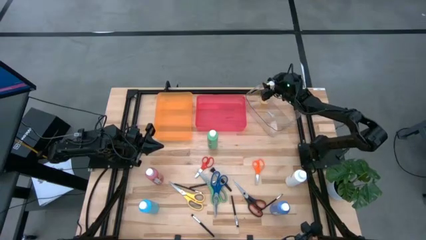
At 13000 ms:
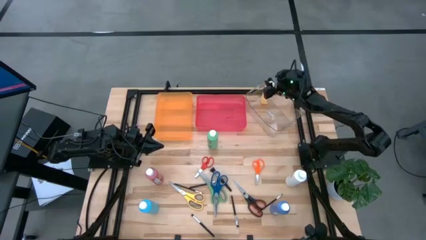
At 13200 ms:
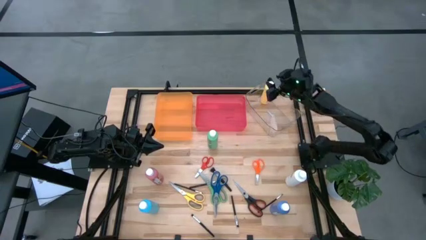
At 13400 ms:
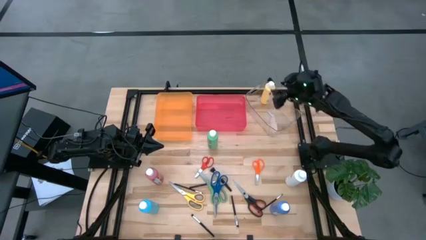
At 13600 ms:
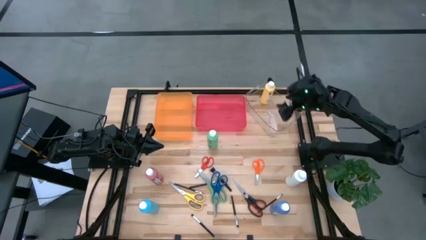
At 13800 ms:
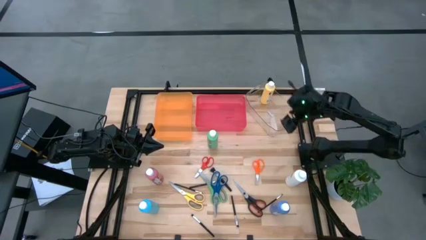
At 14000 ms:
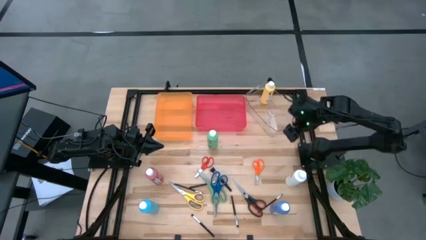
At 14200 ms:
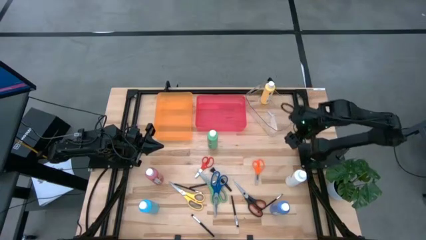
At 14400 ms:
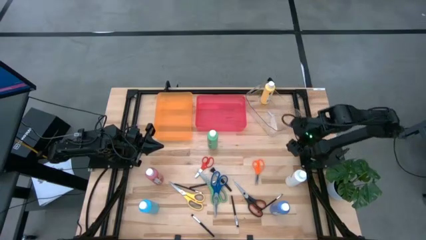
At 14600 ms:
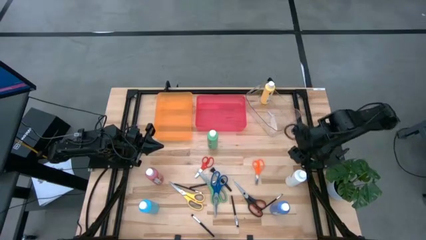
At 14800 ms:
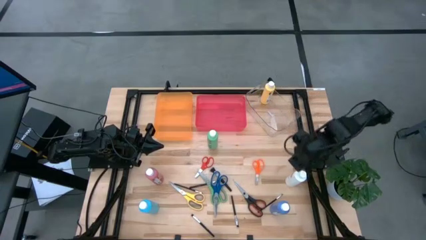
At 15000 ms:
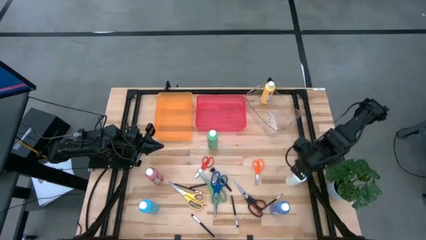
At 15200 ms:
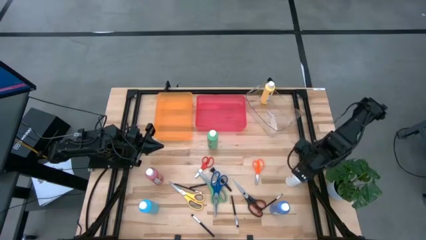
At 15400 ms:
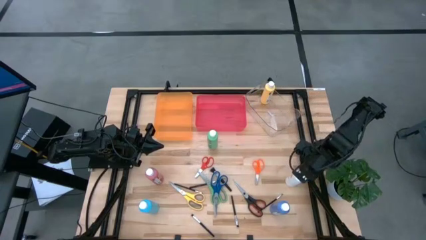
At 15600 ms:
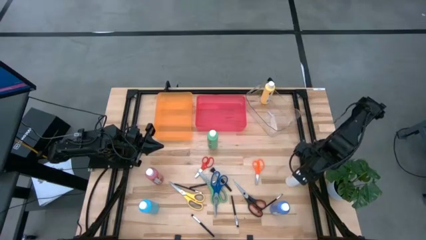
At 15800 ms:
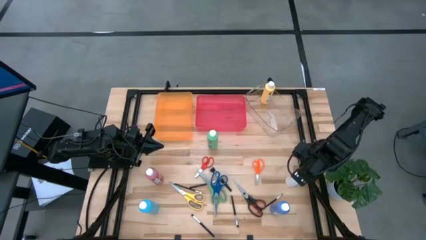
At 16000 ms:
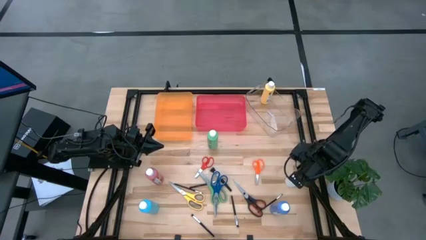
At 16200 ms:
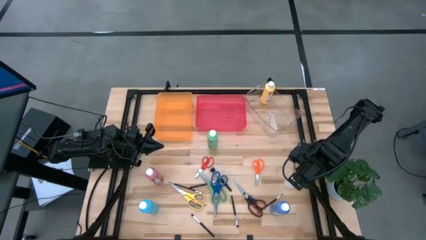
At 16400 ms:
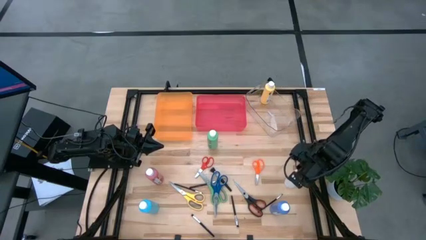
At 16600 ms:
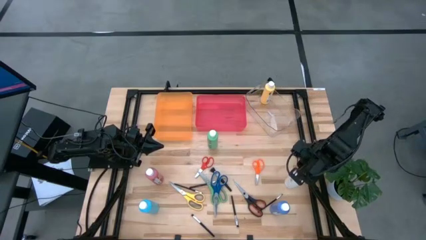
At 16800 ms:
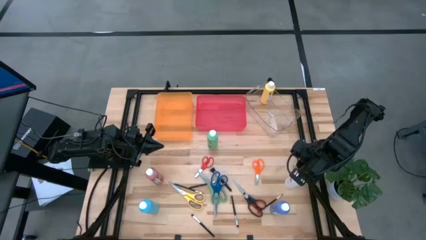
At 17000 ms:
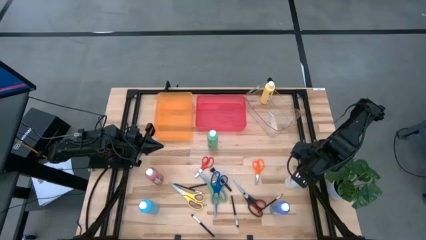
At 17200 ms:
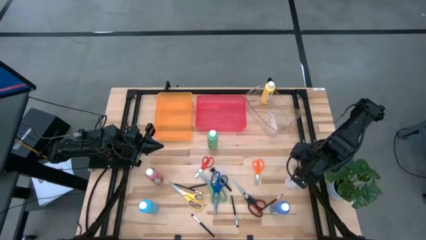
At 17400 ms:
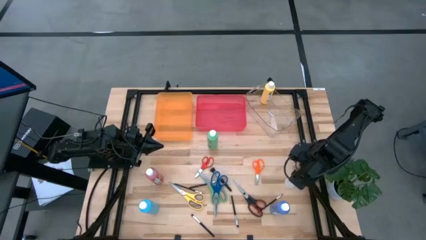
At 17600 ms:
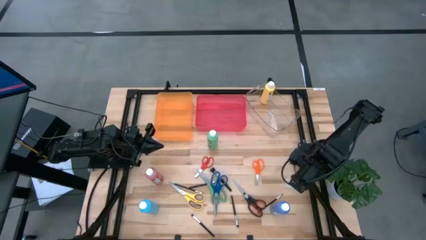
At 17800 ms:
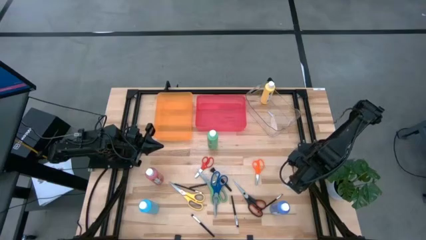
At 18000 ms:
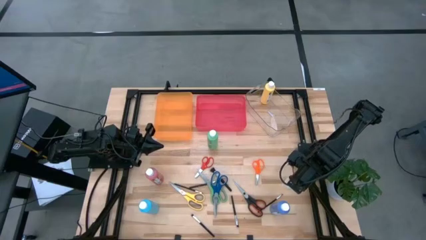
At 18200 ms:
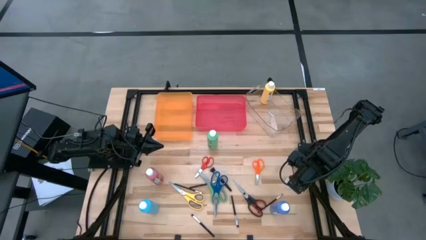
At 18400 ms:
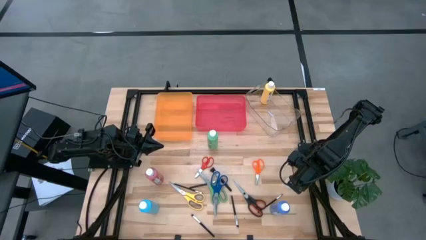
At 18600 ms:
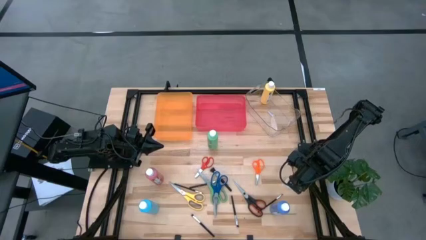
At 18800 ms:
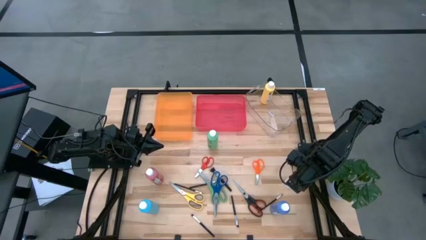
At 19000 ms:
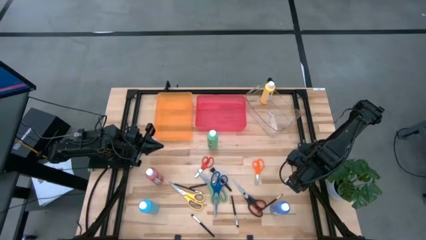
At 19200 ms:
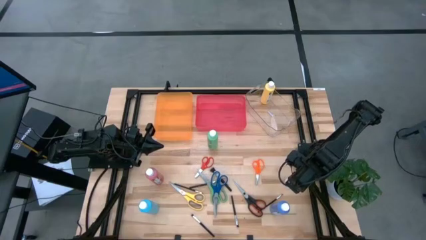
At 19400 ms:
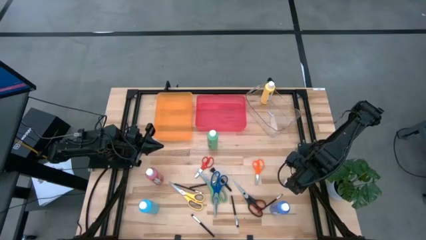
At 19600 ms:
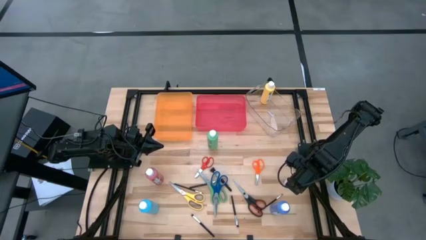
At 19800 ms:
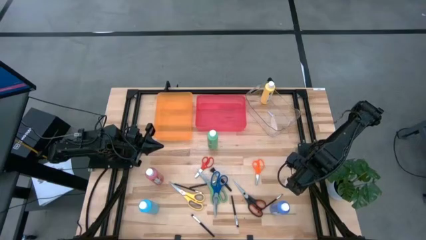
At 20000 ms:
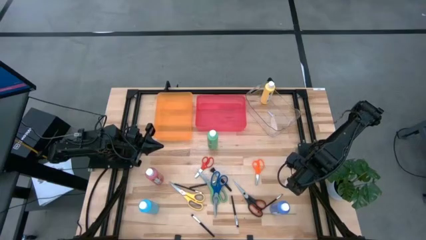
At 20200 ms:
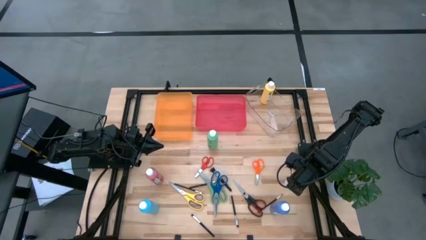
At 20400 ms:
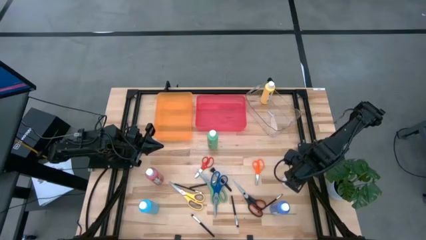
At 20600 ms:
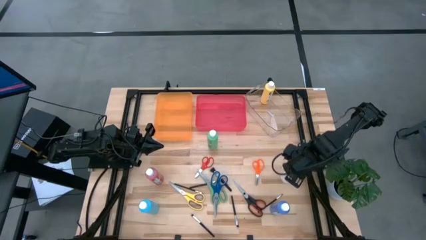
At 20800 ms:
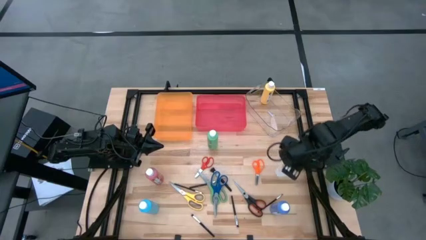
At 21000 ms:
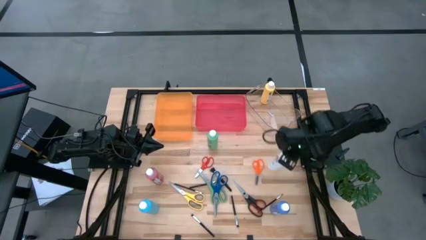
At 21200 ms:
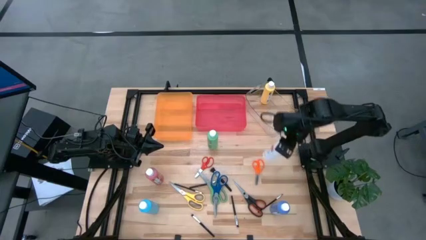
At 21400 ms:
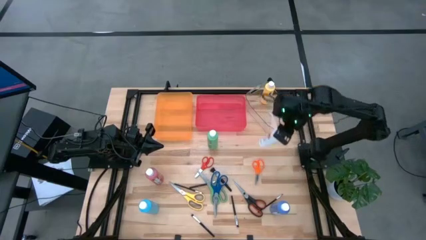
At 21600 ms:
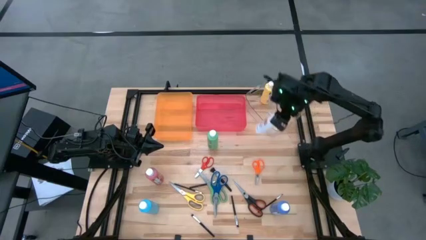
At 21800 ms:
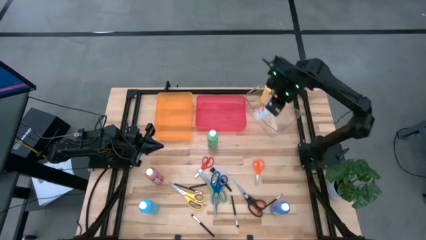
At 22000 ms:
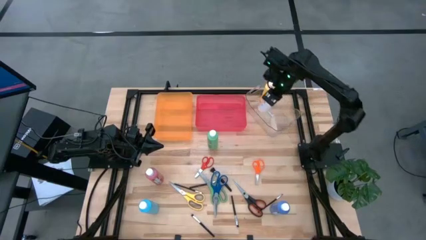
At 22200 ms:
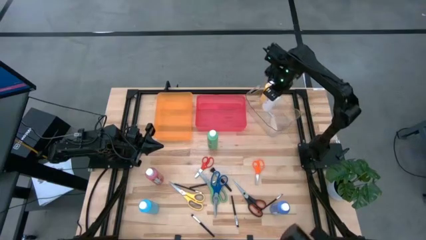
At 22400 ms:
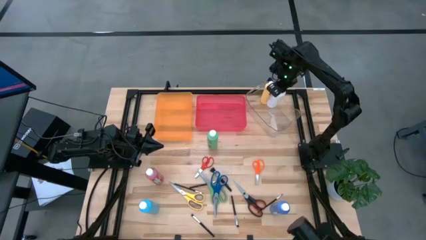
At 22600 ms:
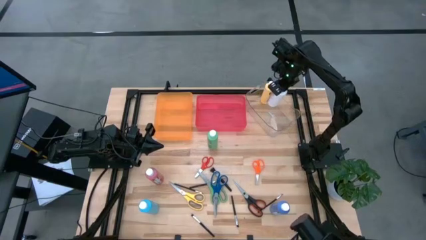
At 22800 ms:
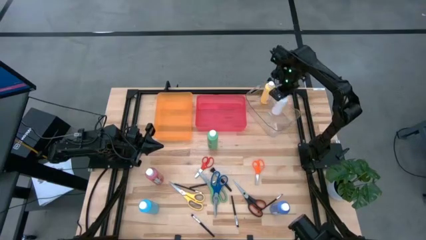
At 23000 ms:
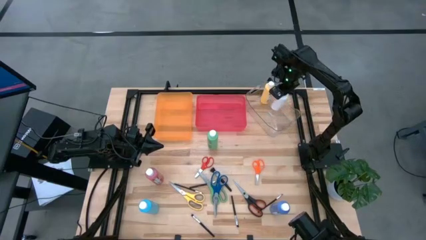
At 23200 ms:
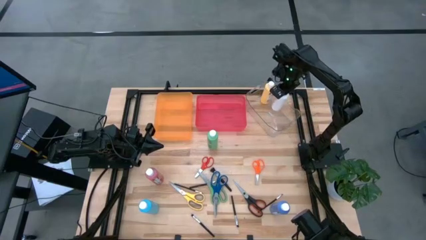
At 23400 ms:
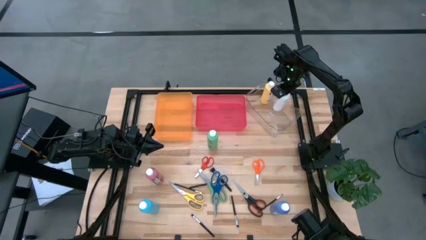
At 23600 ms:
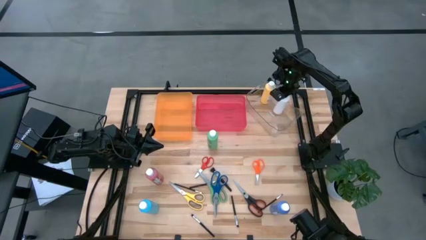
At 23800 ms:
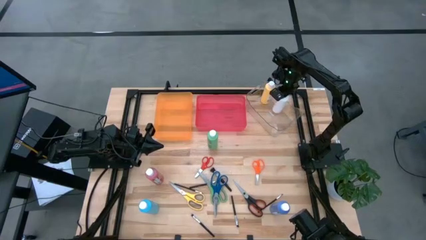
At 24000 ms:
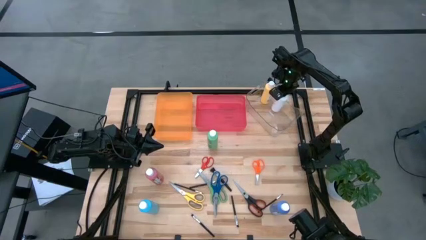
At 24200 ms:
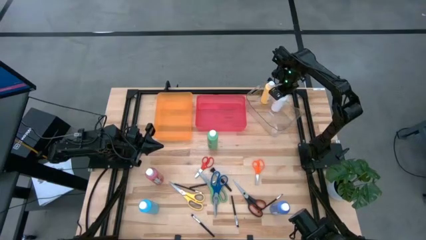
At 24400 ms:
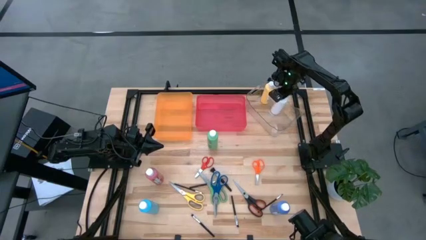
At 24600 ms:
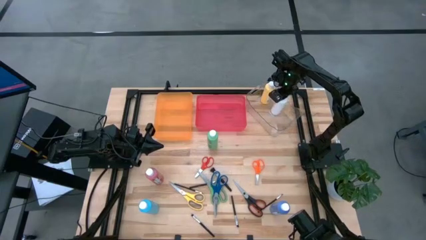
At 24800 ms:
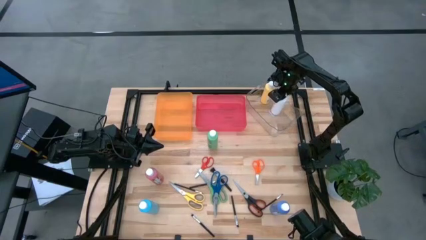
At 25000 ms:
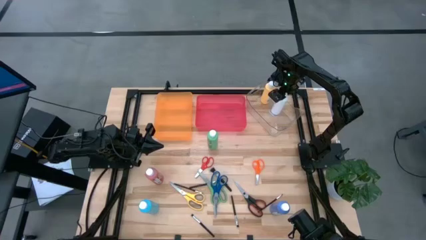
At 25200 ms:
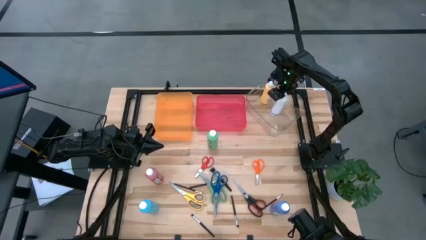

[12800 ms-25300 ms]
Task: Pick & Place Paint Supplies
Put the white paint bottle into the transparent bin
